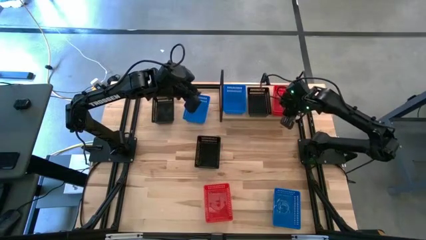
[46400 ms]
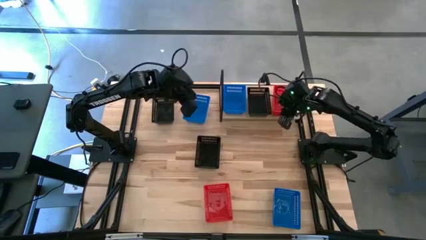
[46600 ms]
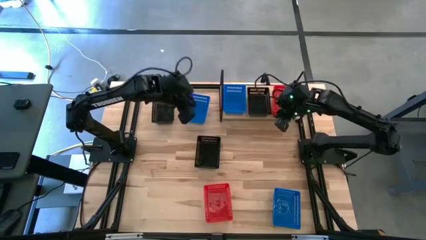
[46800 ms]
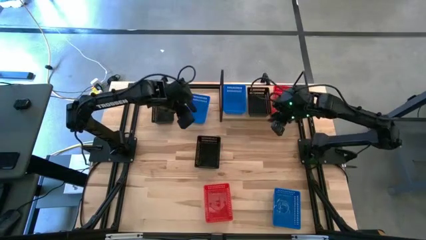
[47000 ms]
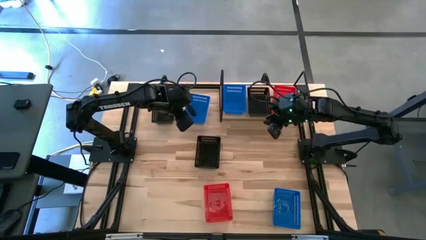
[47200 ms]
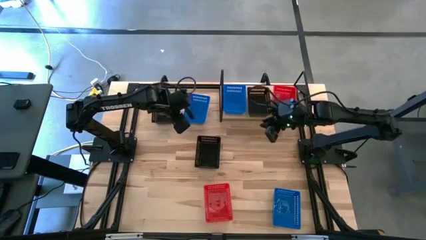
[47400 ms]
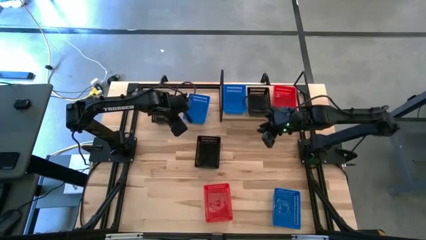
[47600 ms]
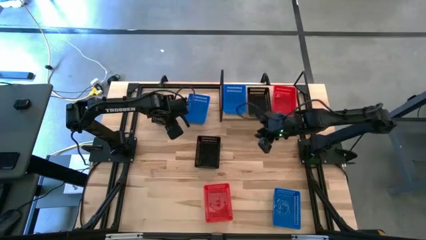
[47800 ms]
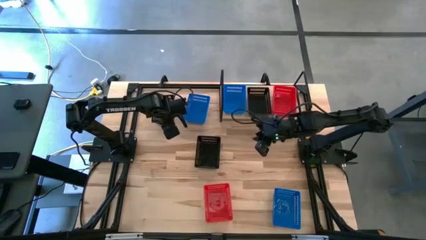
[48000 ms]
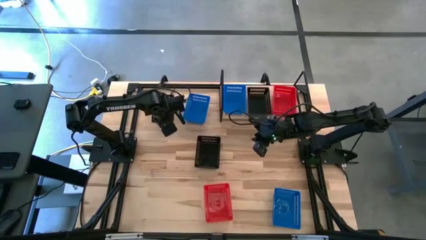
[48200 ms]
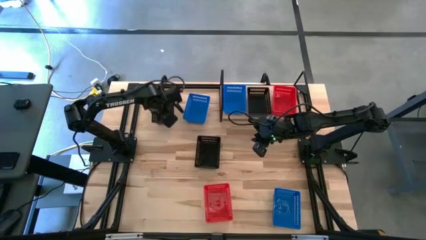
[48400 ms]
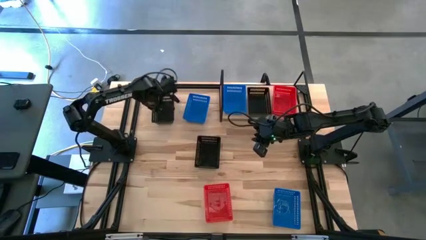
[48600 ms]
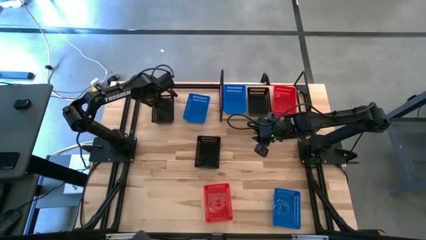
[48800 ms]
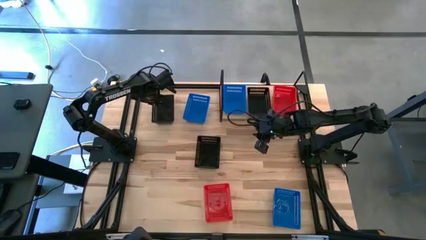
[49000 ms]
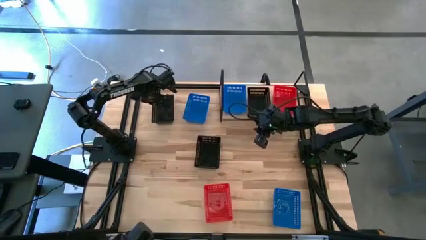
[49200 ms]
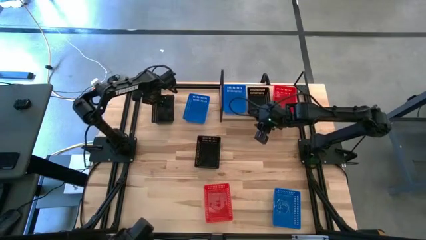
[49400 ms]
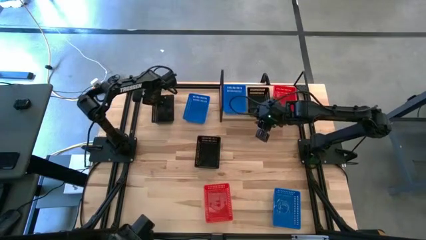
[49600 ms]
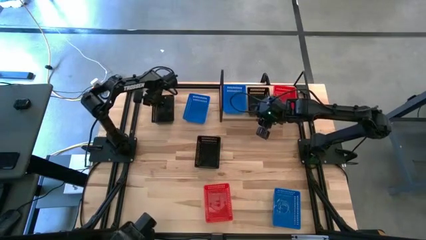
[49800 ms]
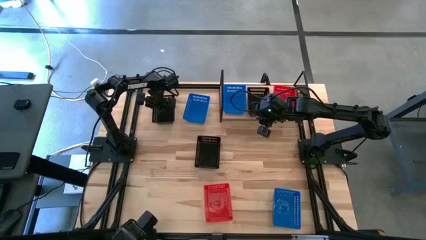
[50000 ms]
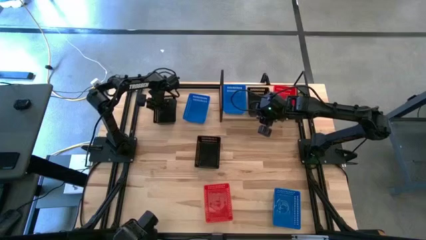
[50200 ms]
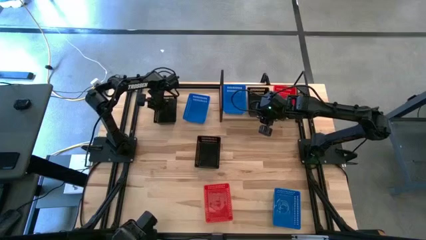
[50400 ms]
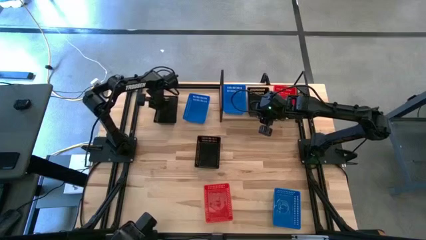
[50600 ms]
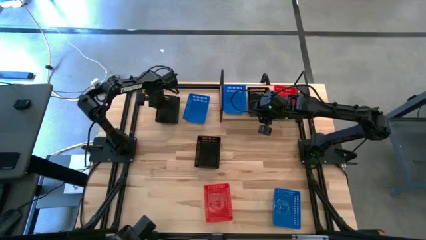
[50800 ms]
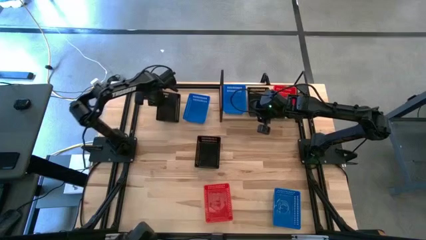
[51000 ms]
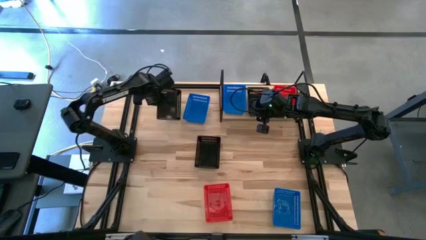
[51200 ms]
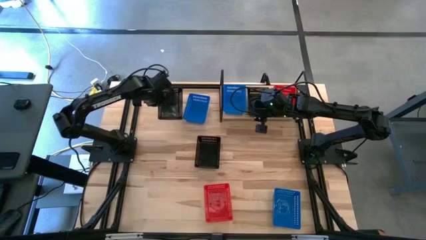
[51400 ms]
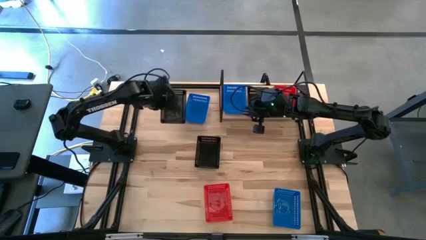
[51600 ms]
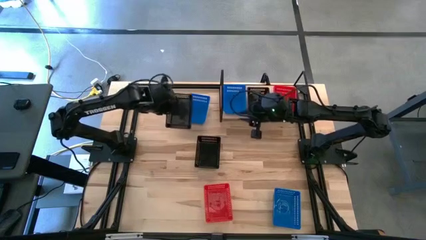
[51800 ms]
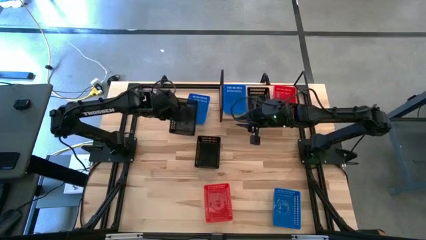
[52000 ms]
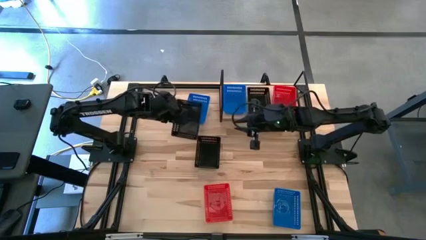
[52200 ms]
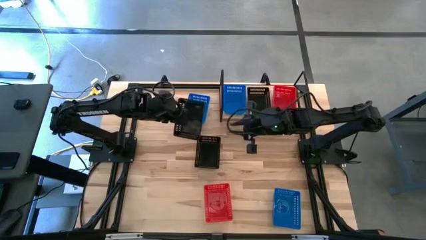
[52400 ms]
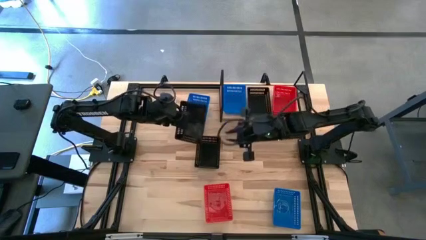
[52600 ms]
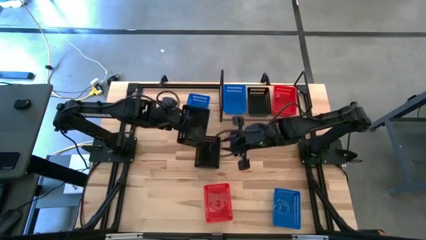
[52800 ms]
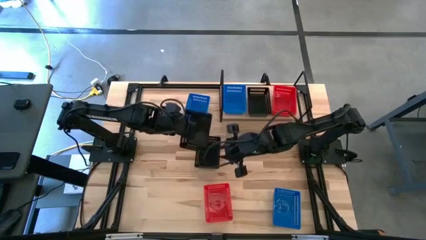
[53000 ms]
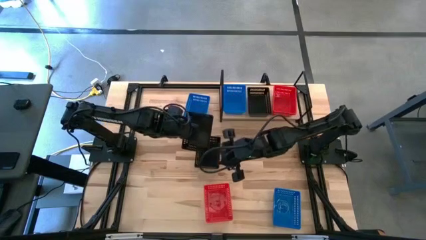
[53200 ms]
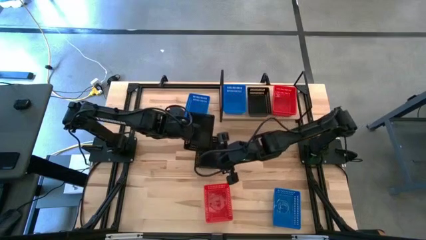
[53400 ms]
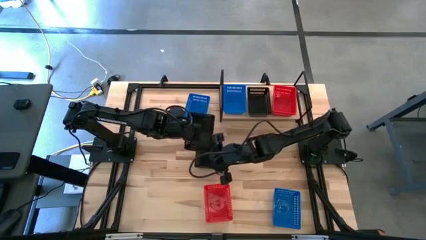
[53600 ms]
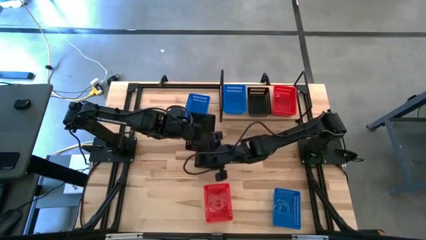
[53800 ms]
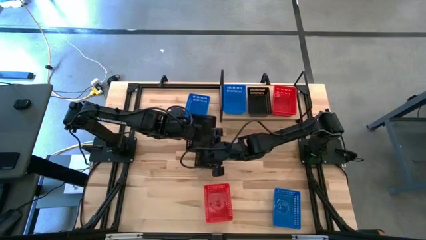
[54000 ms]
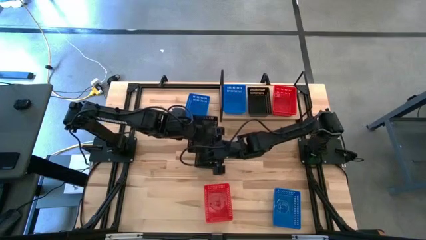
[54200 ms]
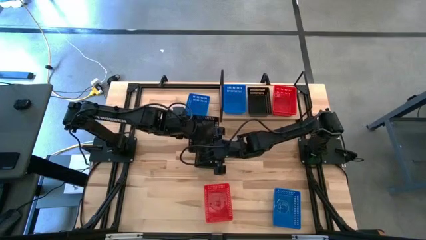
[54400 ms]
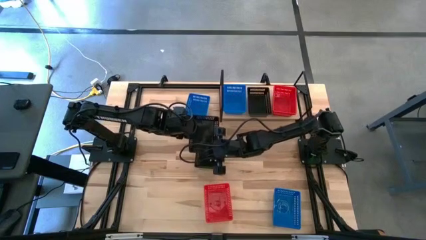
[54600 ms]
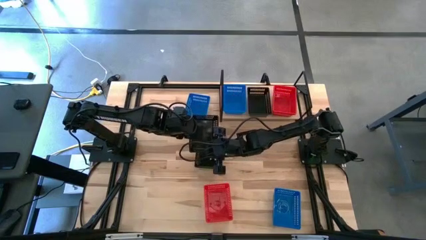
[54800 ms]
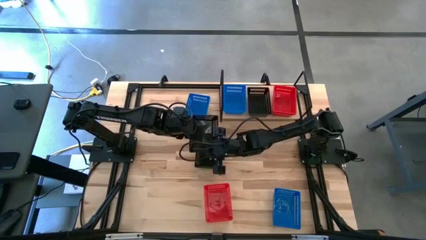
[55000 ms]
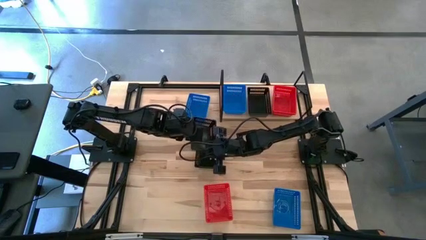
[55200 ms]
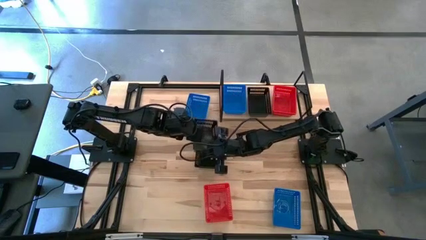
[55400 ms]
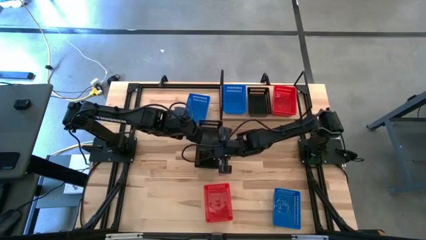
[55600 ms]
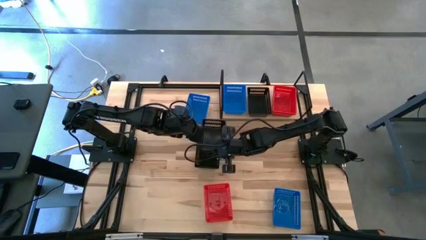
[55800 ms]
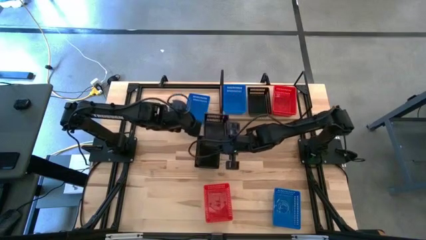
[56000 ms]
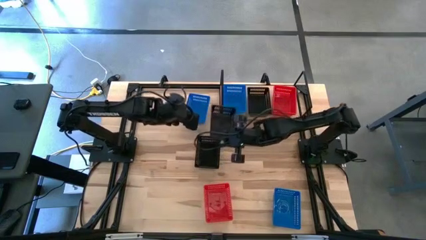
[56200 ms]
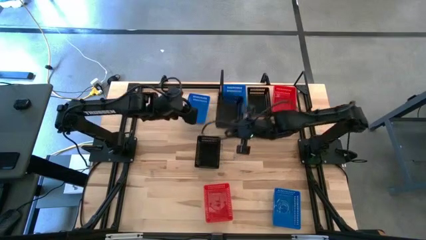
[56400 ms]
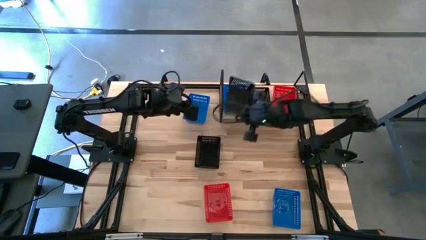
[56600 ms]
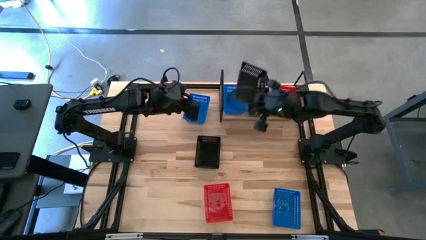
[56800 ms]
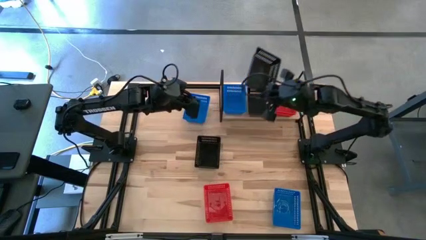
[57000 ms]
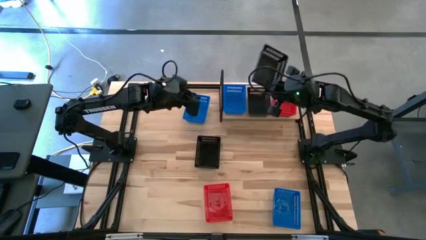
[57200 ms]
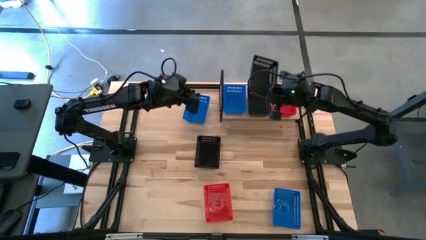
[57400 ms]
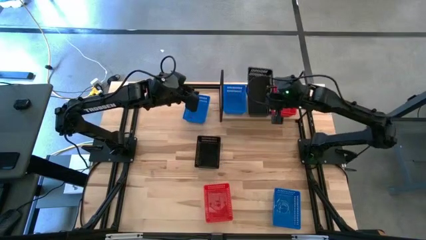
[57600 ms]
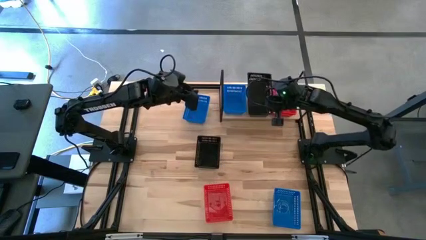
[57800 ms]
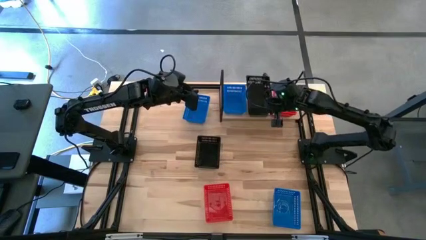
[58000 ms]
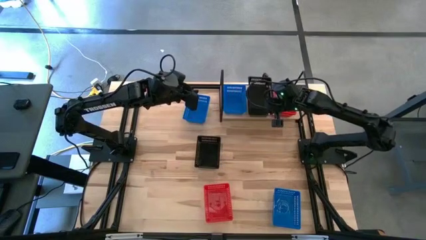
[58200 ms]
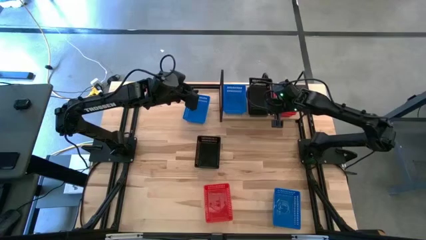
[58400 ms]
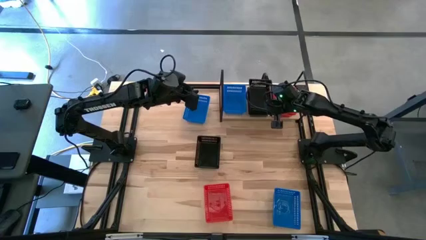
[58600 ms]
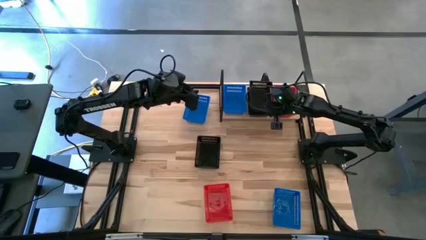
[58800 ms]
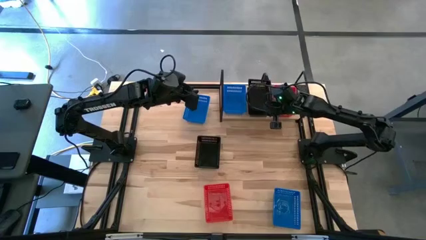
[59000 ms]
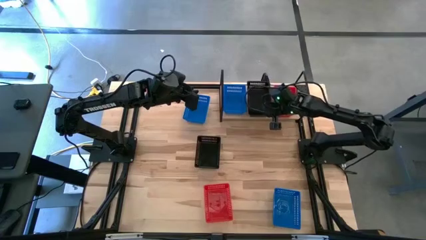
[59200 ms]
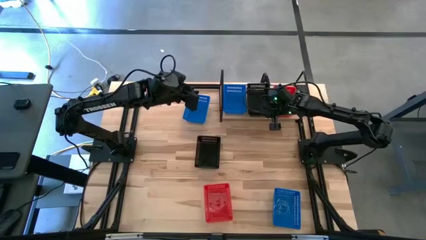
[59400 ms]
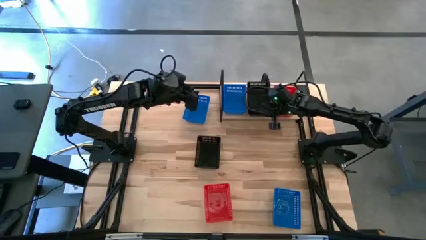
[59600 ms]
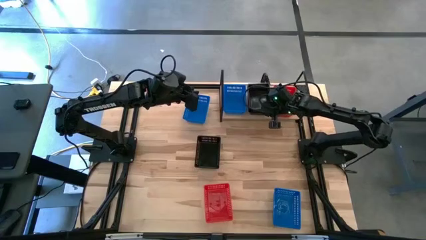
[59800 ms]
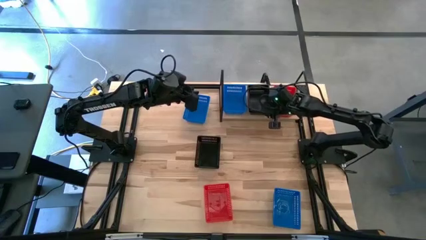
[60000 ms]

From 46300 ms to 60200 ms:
Task: Stack baskets on shelf by color
Stack the top black bin on top of the other black bin on the shelf

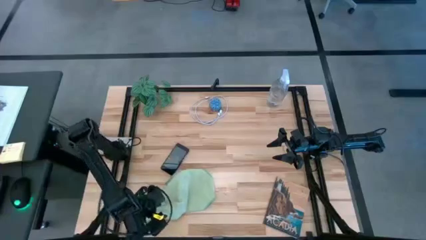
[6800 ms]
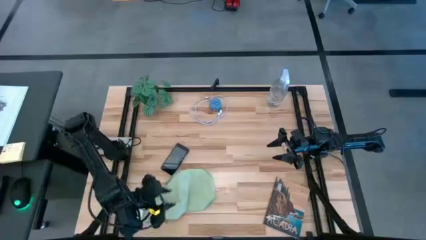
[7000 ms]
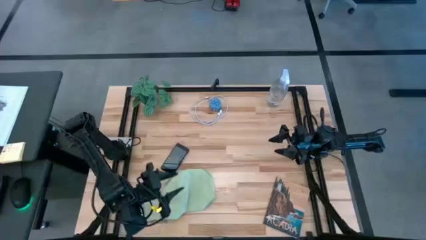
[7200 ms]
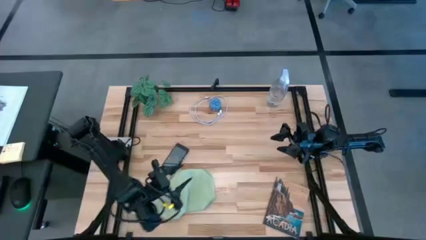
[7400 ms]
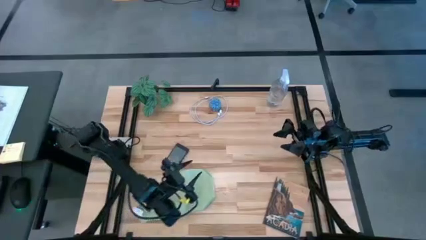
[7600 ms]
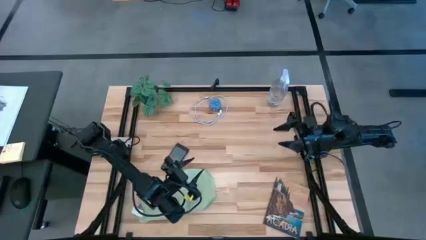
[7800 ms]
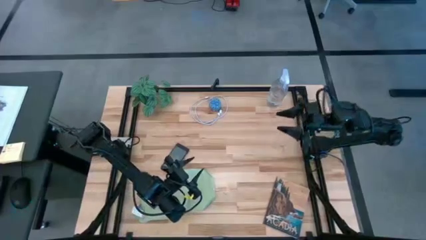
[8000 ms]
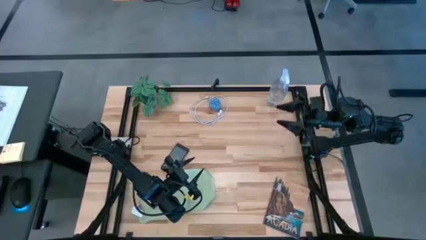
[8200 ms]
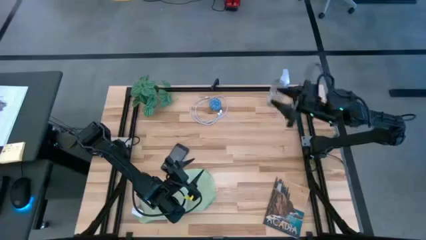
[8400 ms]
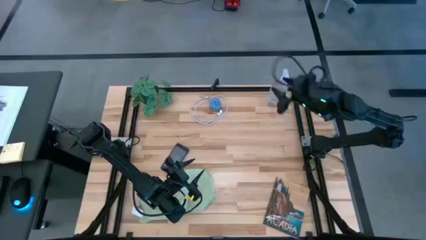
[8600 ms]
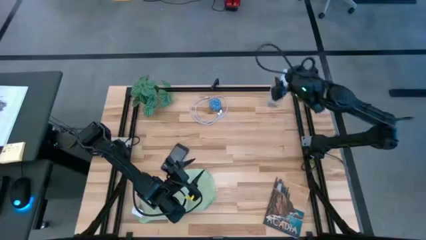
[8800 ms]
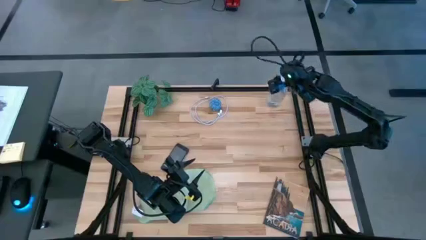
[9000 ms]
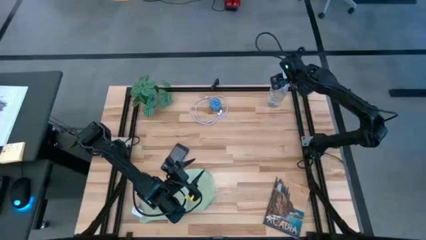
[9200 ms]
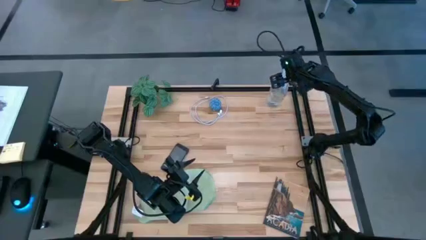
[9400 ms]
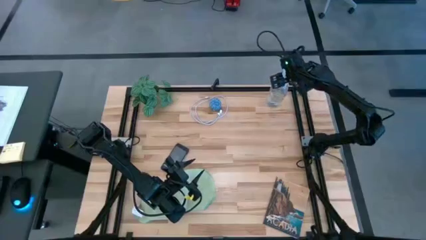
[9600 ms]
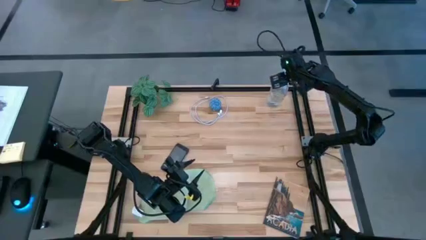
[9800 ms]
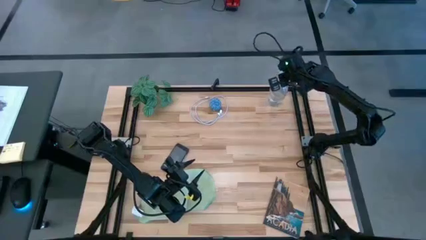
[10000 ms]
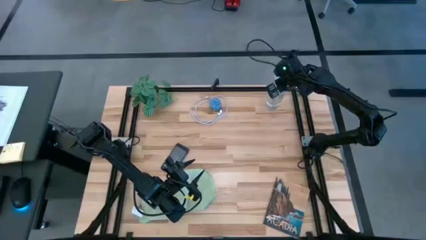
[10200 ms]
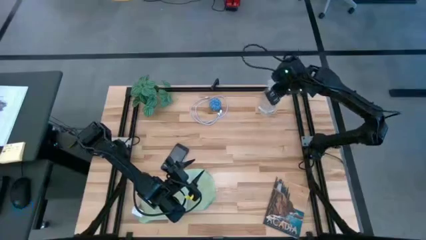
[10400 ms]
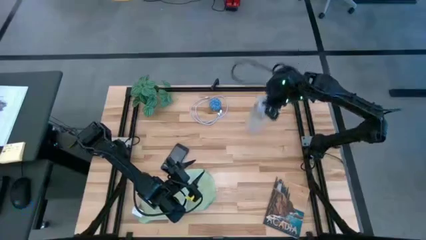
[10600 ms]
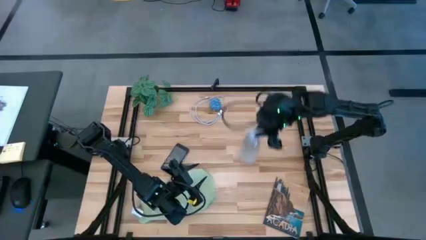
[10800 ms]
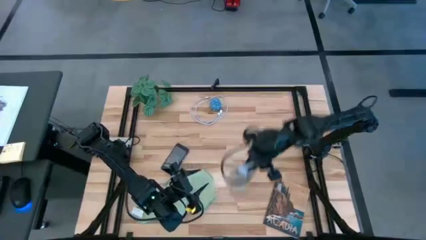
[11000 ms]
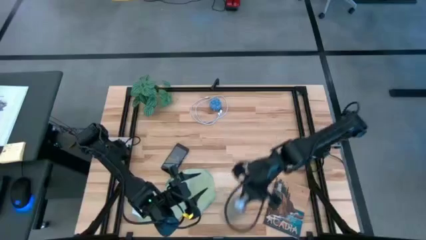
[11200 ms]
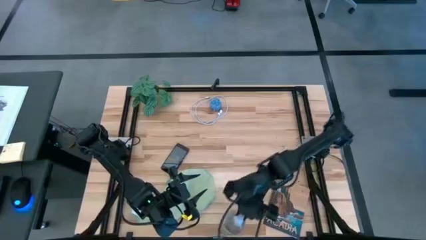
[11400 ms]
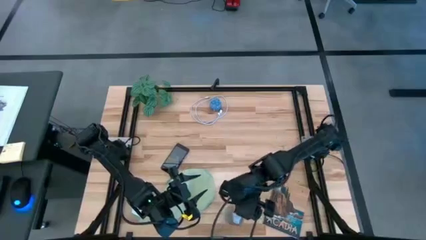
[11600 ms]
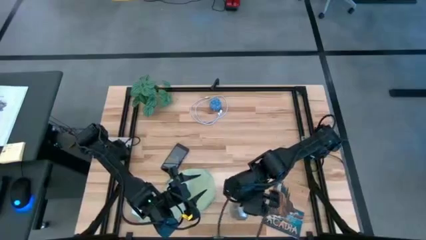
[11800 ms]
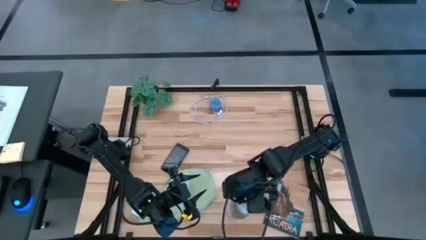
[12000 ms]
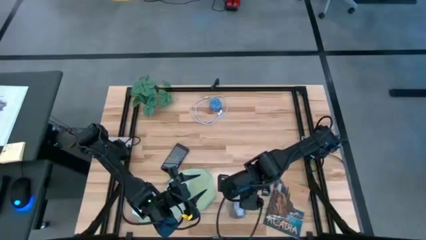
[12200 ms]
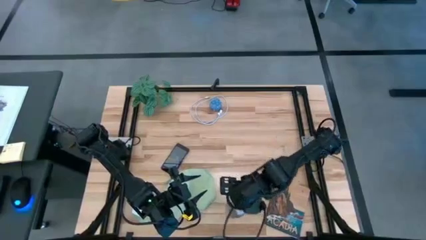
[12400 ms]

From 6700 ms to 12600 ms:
Task: Apply microfiber cloth
Spray the phone using the spray bottle
